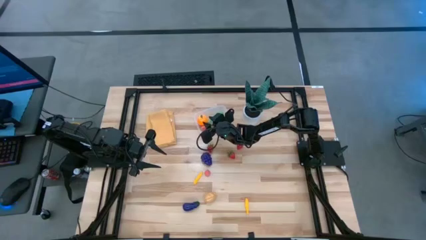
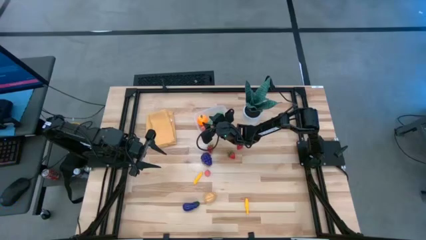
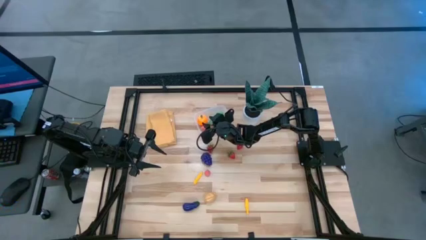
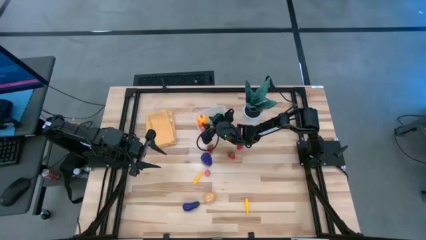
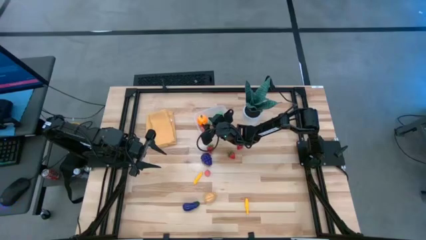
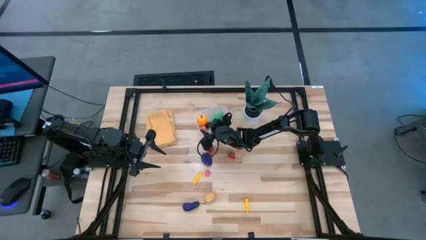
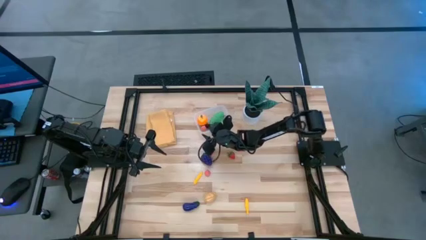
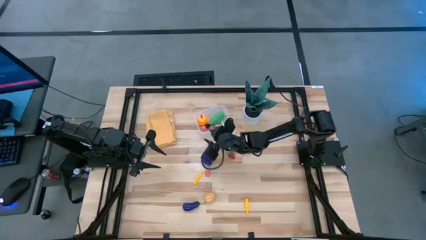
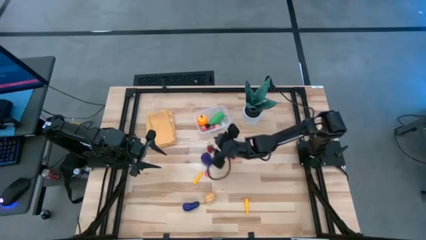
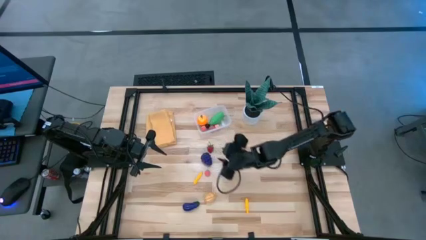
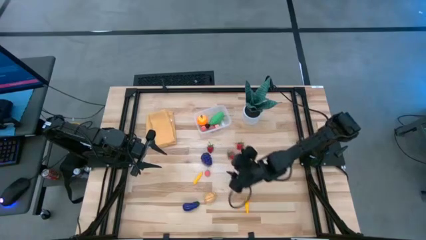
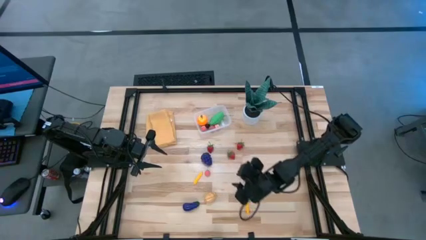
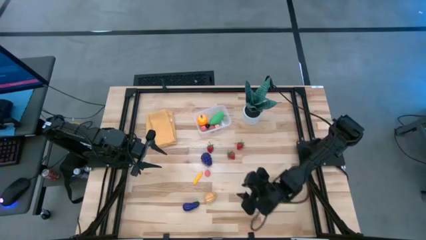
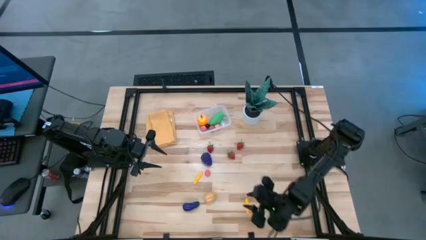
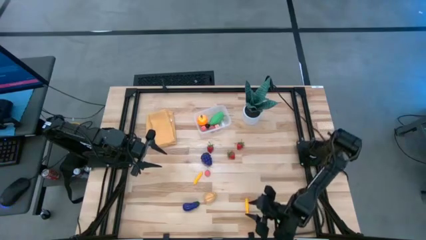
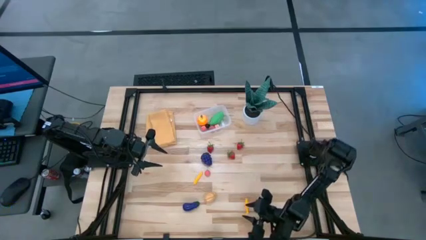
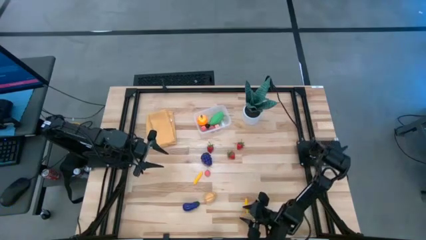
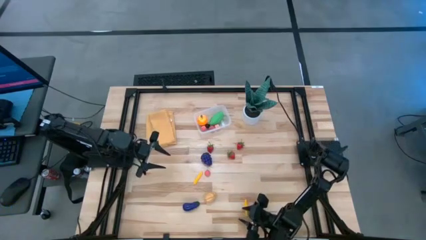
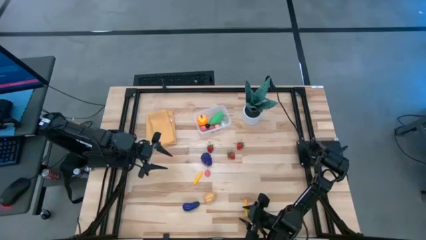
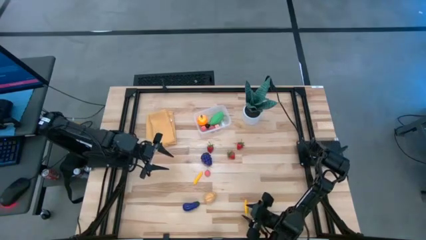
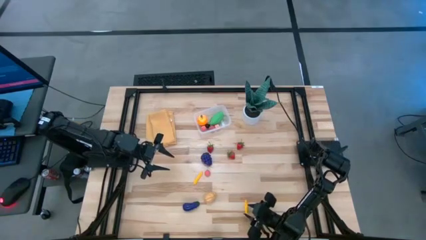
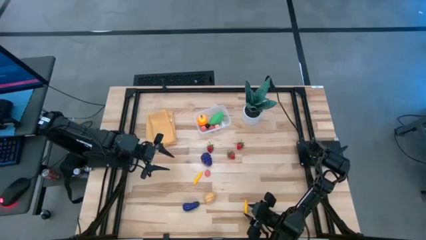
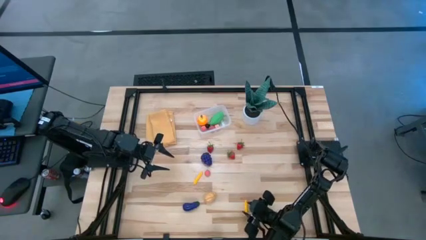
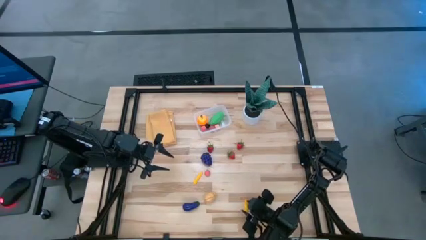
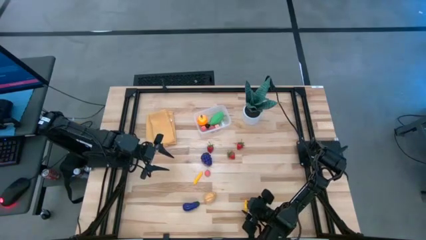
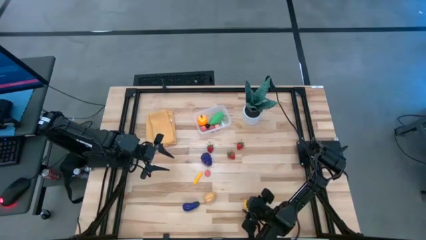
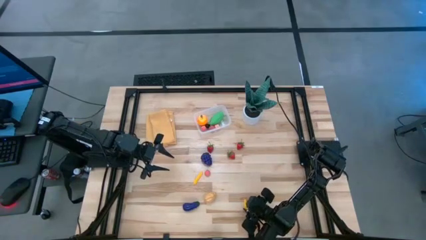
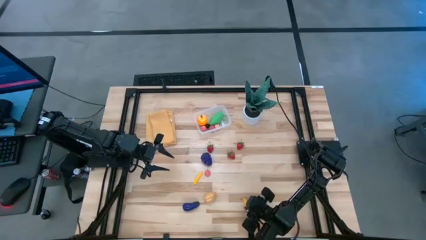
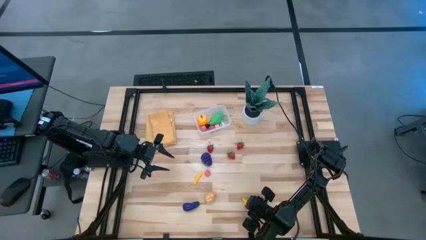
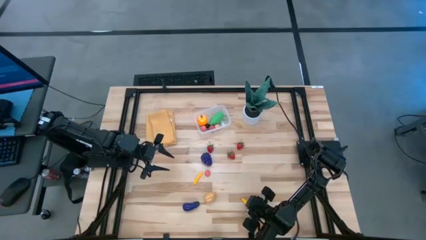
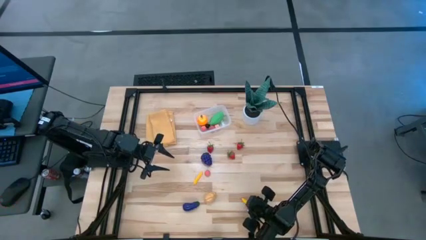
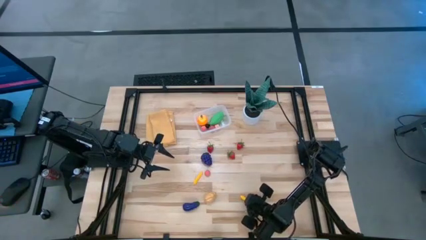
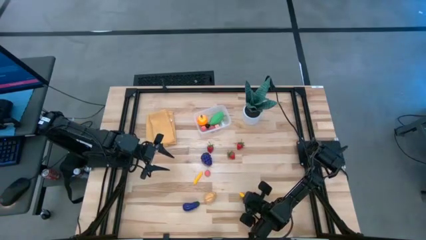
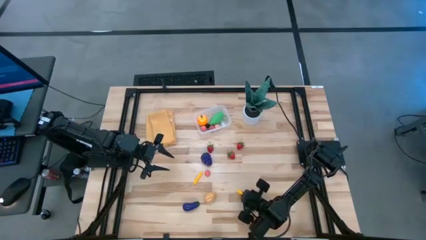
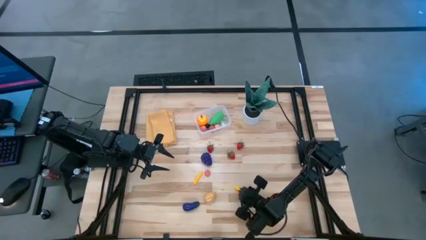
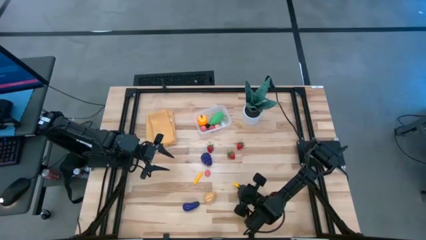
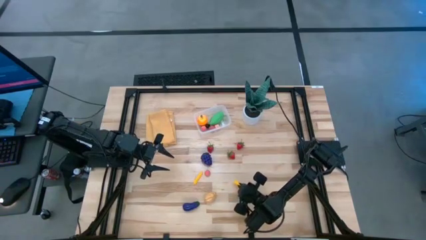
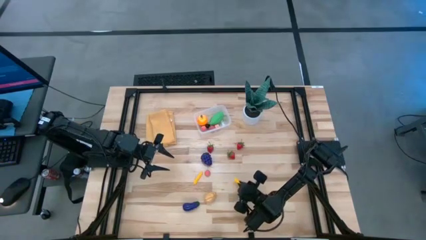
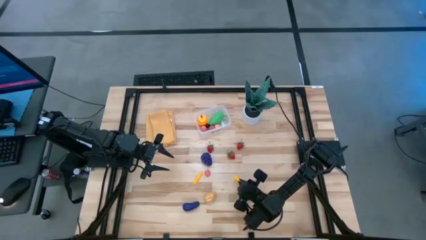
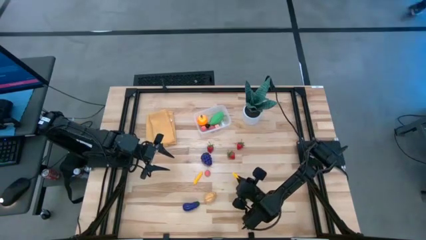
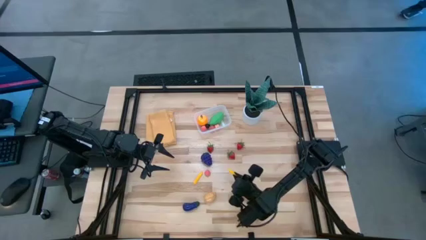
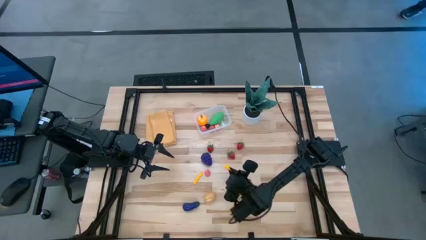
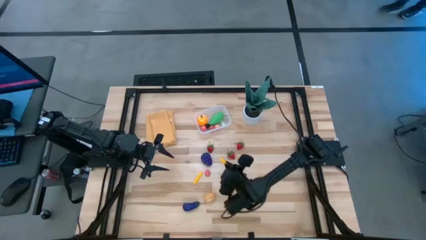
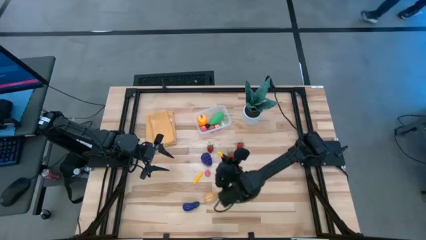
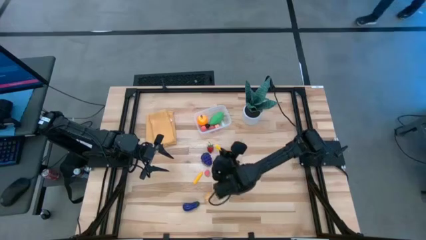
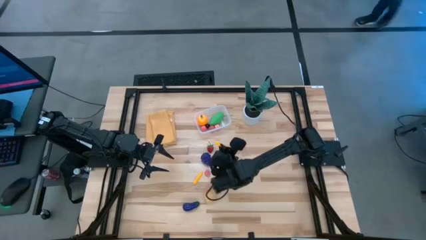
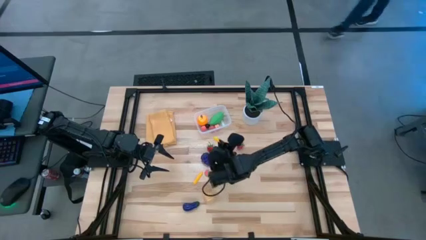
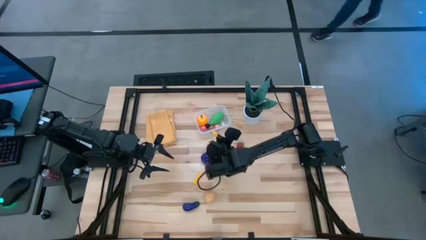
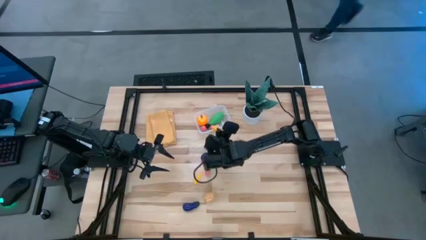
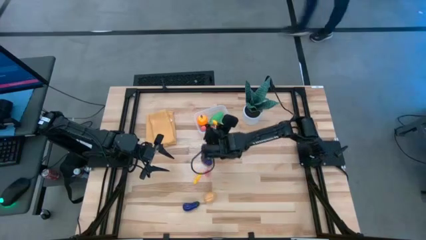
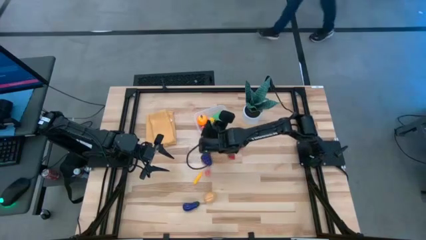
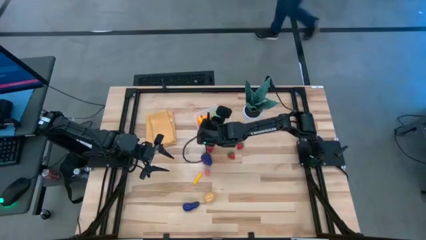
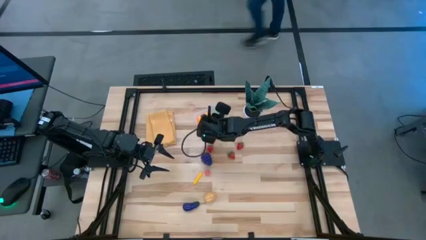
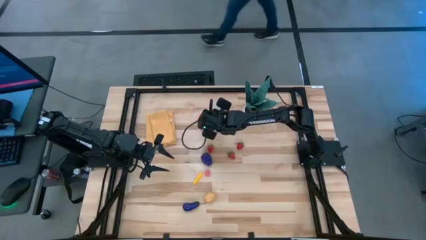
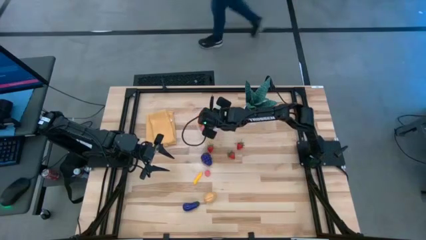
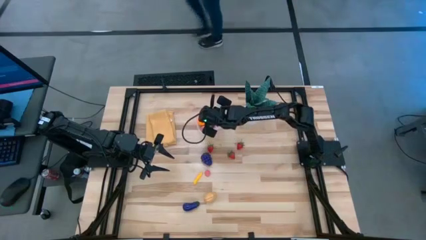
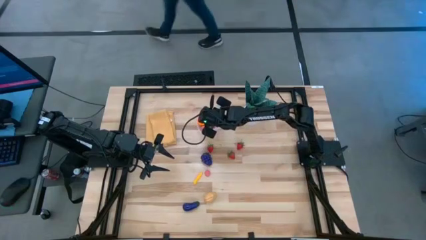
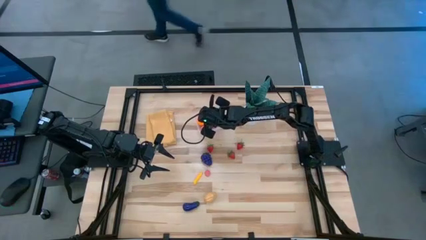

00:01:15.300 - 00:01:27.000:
Task: Pick and placing Produce into tupperware
Put the right yellow corn into the transparent bin

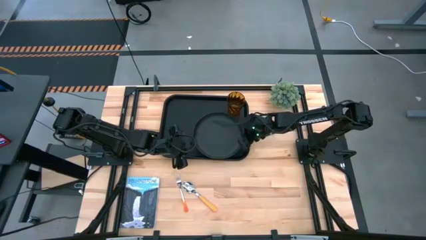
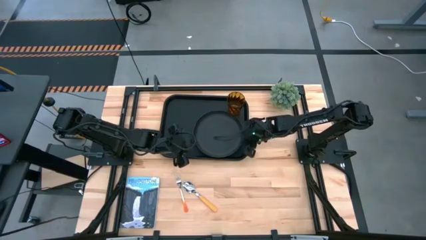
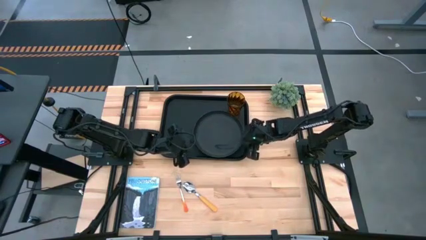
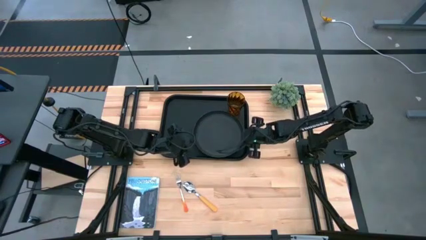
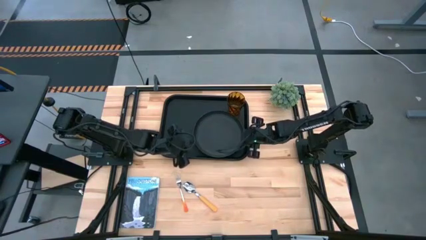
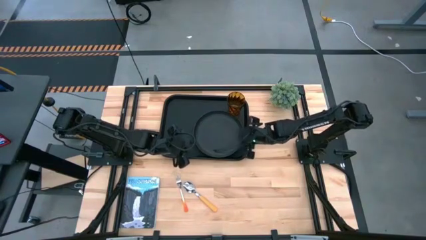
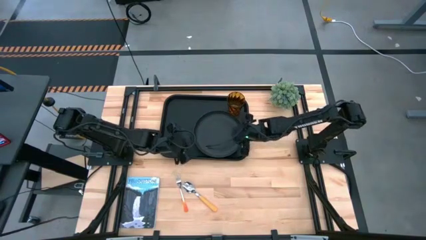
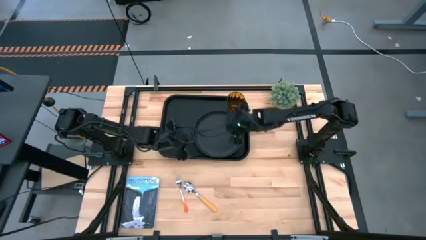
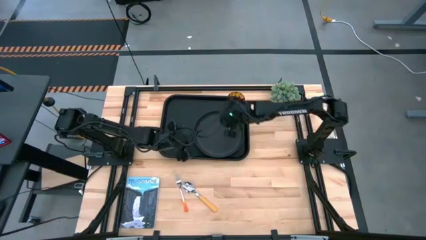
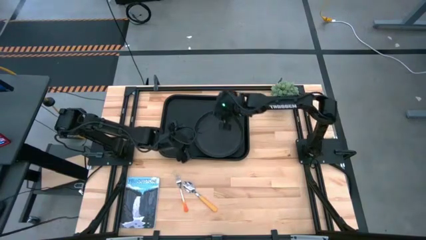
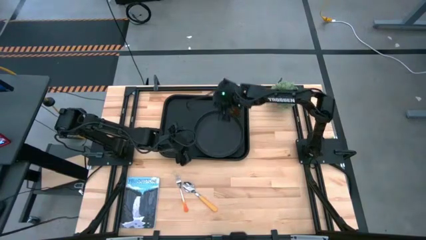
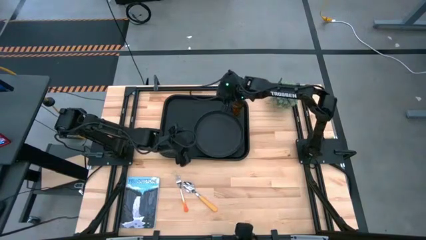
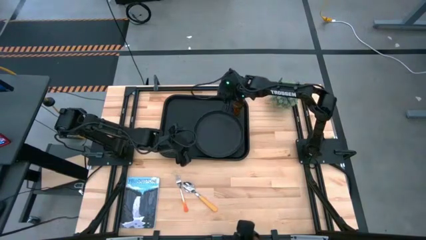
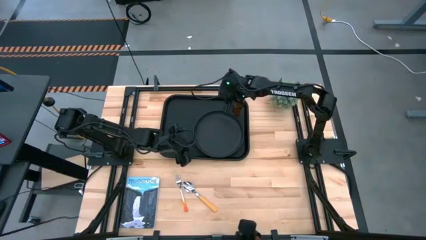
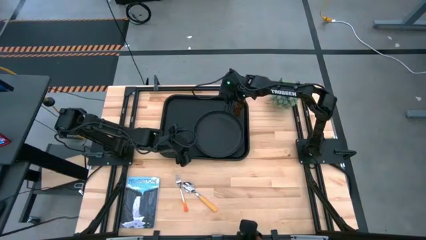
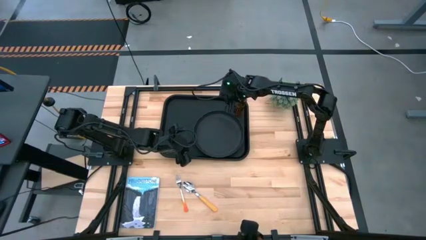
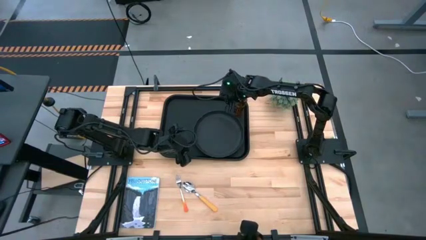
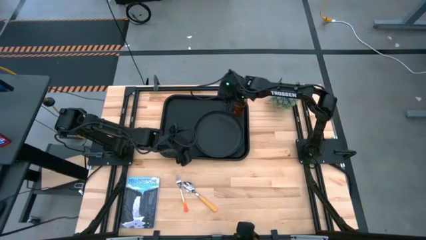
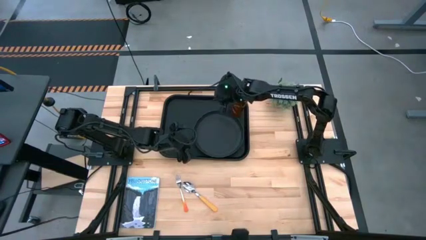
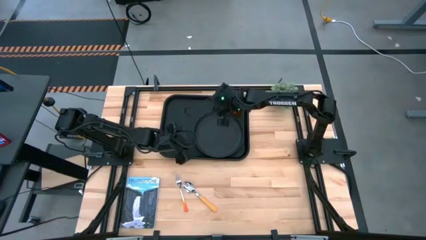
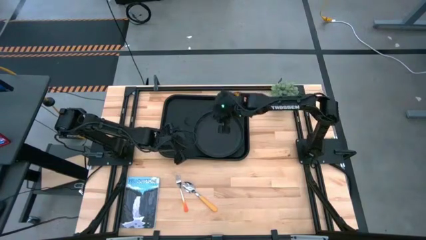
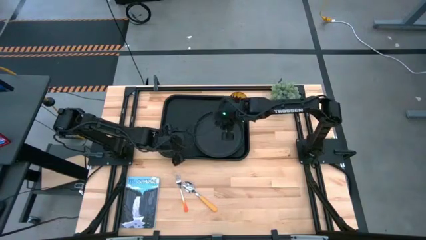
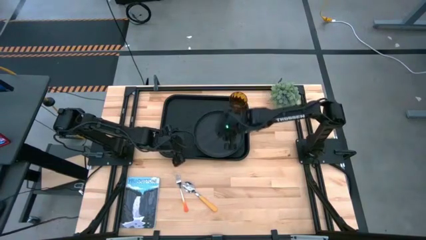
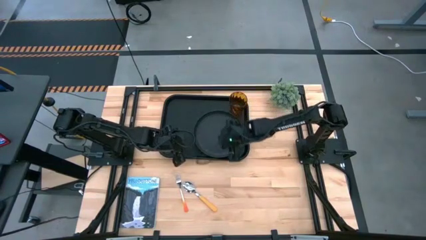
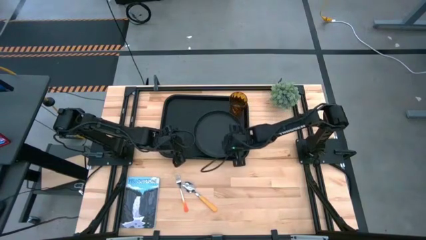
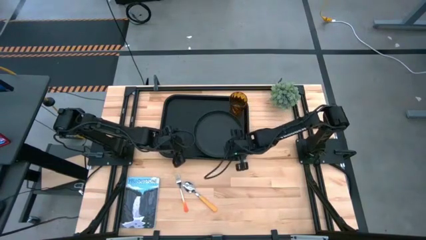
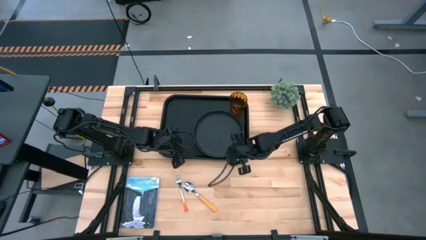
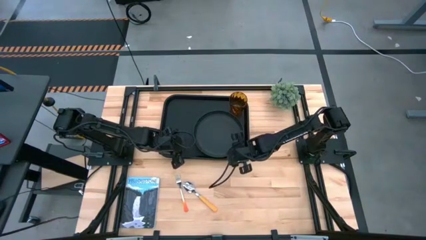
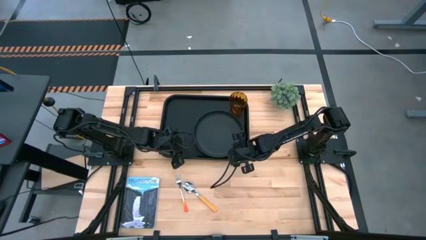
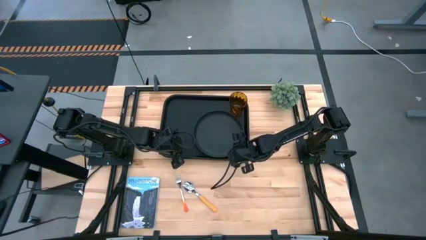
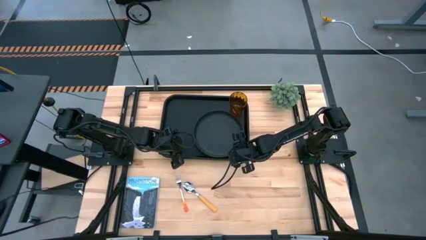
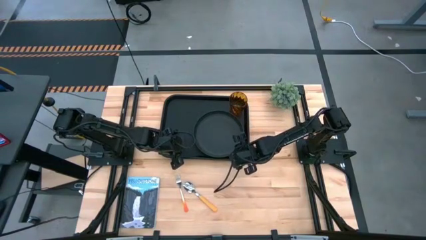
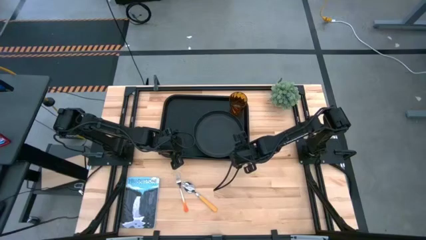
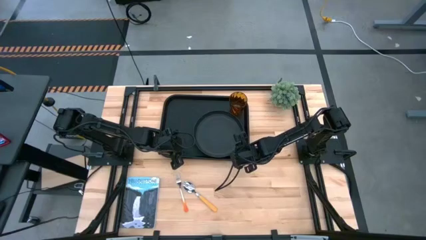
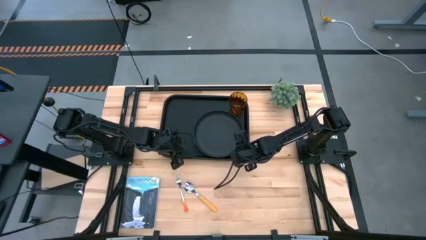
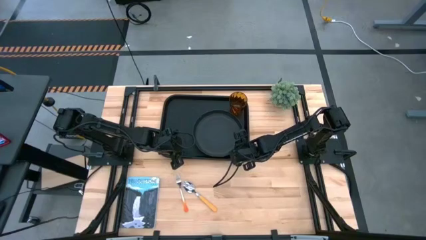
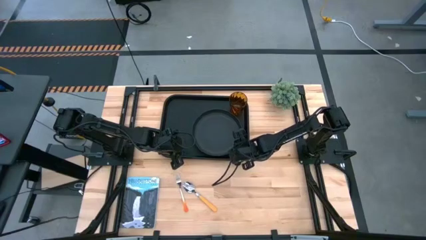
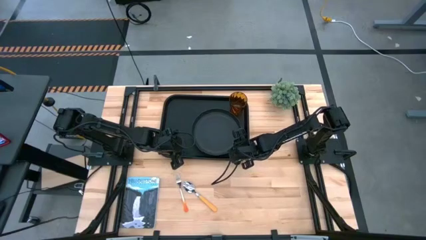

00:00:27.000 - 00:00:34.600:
Task: Pick and place plate/cup/fork/spoon on tray
Adjust the orange cup
